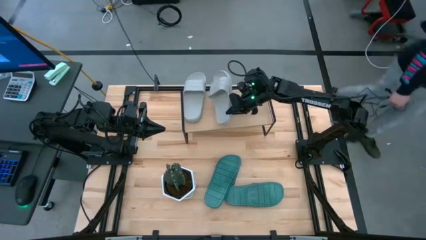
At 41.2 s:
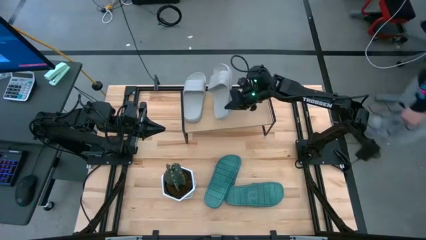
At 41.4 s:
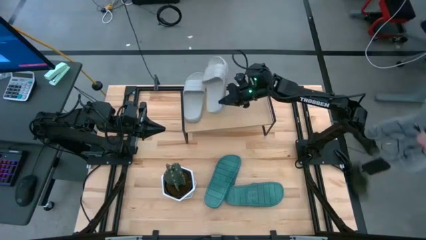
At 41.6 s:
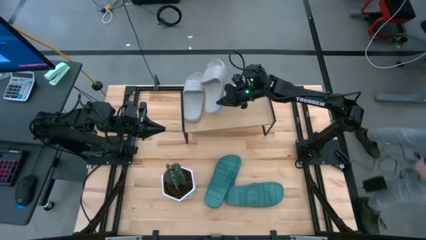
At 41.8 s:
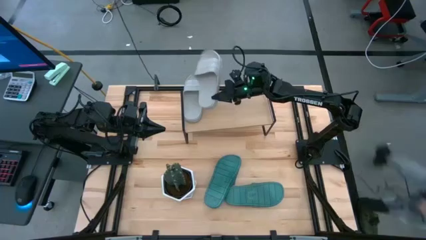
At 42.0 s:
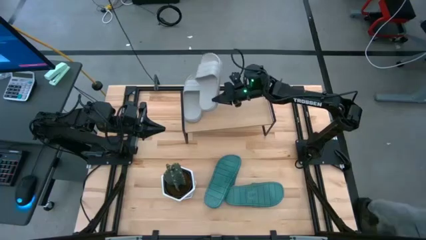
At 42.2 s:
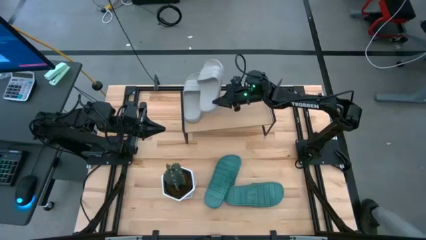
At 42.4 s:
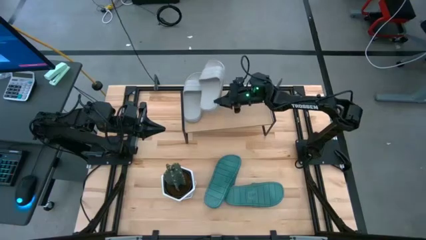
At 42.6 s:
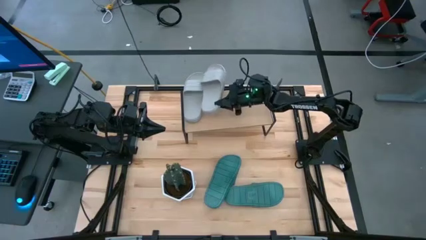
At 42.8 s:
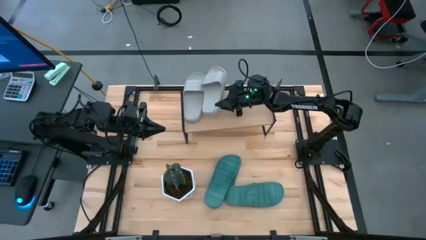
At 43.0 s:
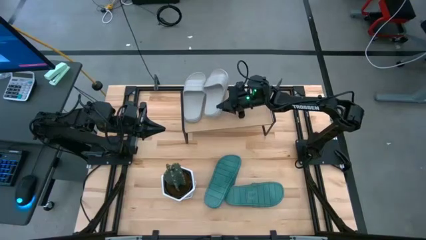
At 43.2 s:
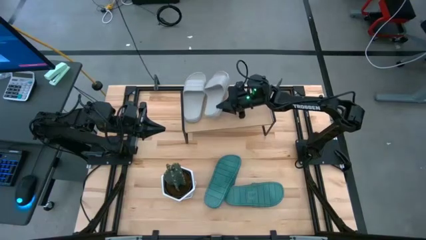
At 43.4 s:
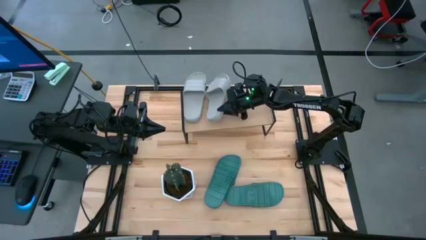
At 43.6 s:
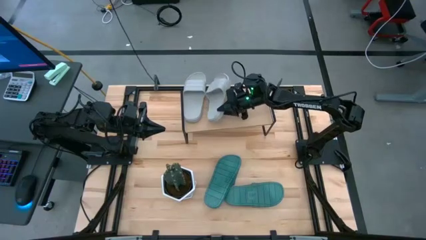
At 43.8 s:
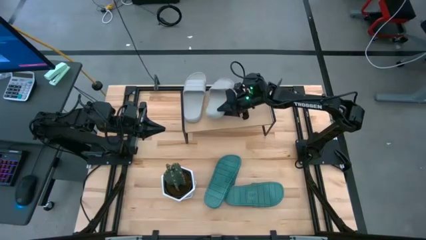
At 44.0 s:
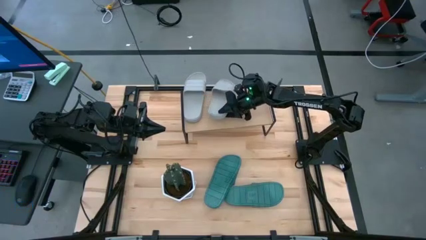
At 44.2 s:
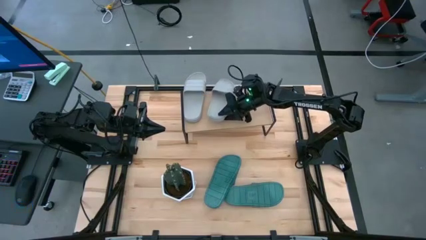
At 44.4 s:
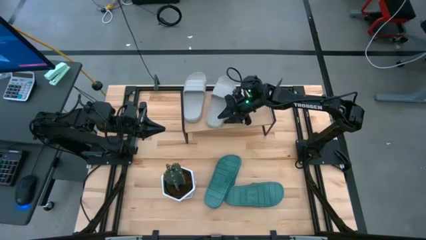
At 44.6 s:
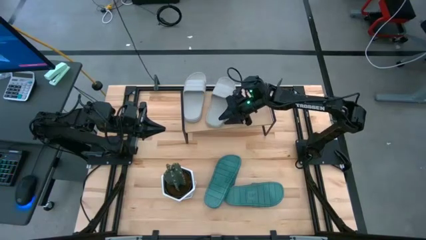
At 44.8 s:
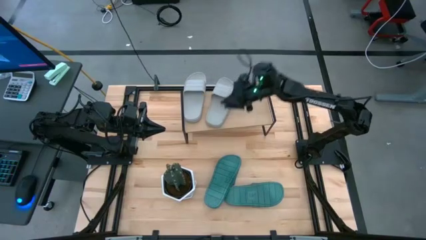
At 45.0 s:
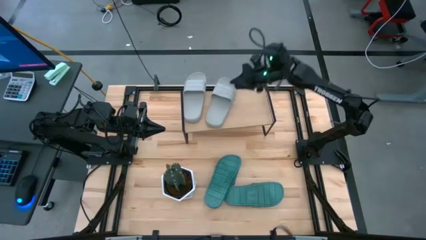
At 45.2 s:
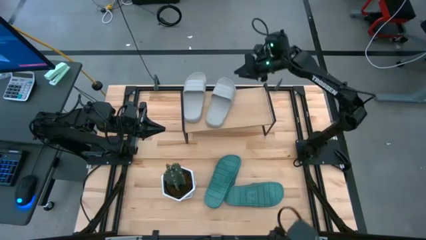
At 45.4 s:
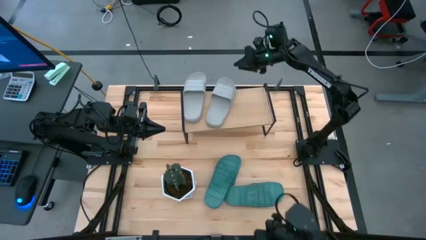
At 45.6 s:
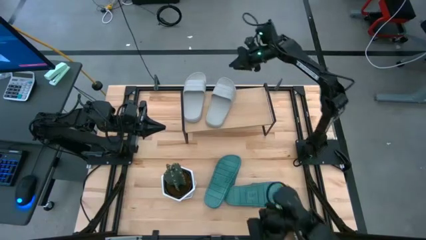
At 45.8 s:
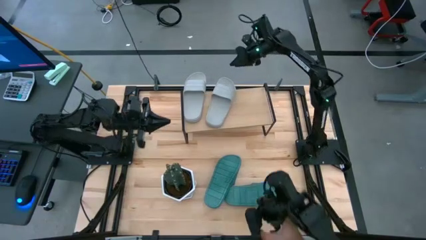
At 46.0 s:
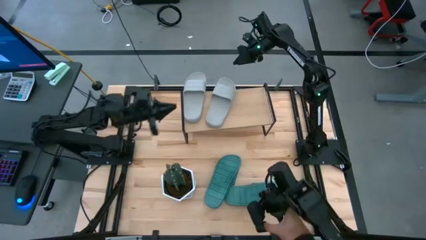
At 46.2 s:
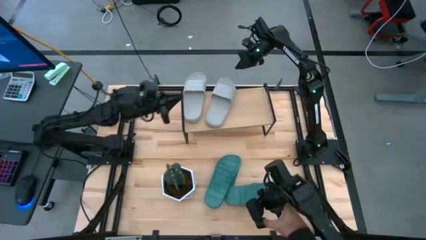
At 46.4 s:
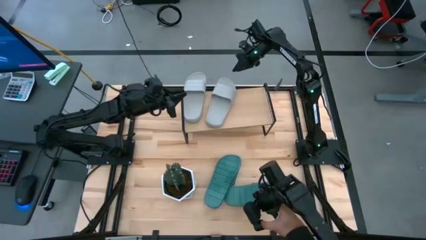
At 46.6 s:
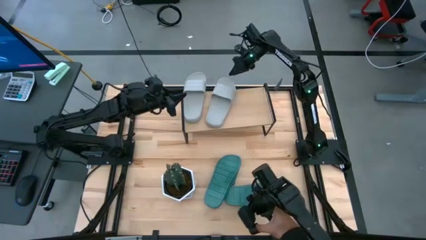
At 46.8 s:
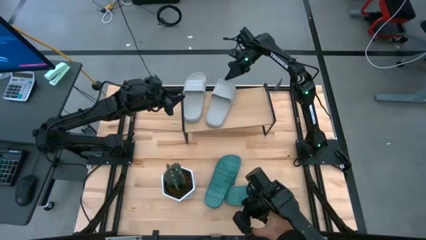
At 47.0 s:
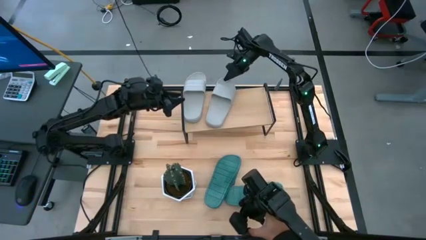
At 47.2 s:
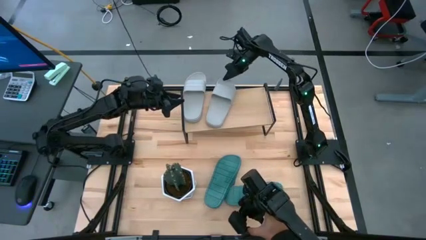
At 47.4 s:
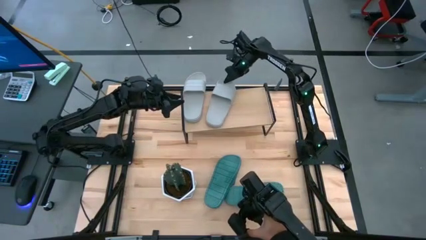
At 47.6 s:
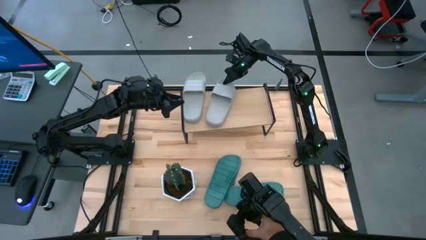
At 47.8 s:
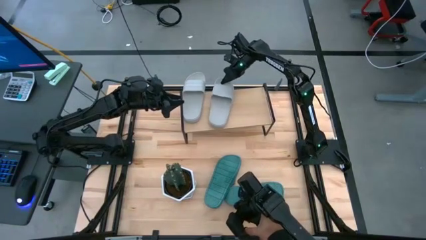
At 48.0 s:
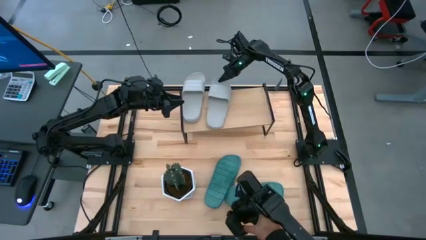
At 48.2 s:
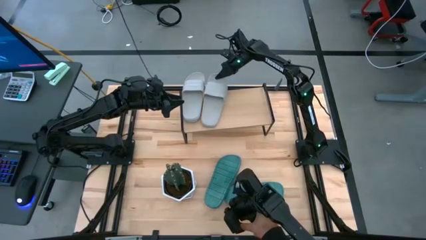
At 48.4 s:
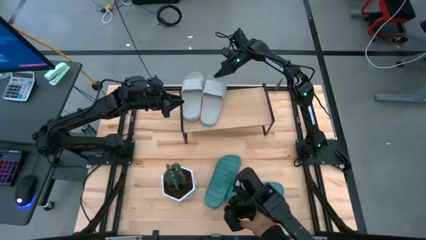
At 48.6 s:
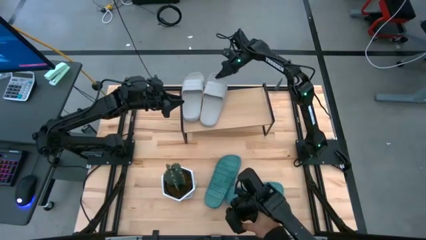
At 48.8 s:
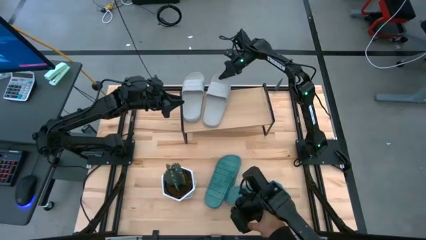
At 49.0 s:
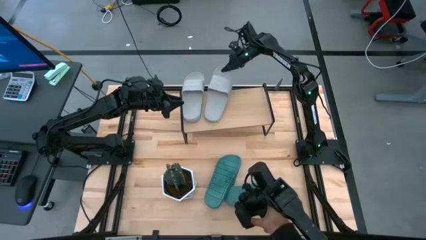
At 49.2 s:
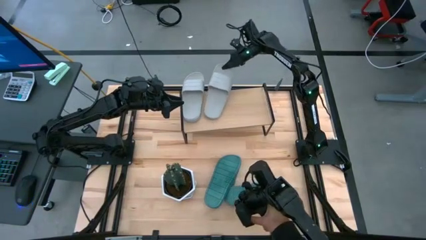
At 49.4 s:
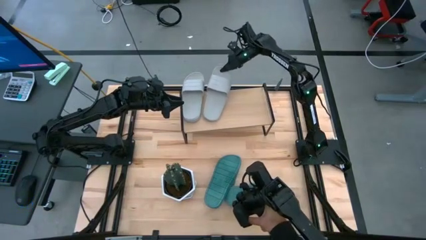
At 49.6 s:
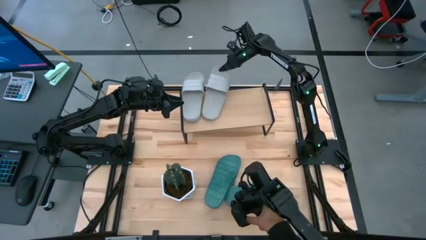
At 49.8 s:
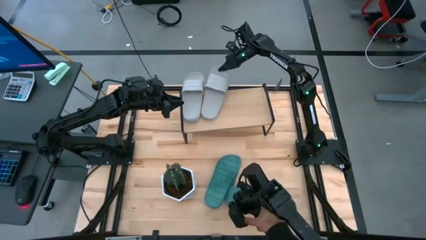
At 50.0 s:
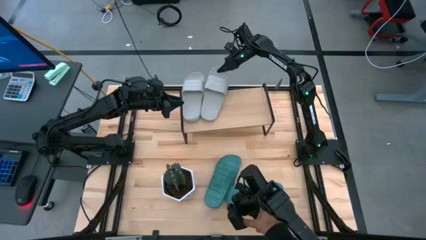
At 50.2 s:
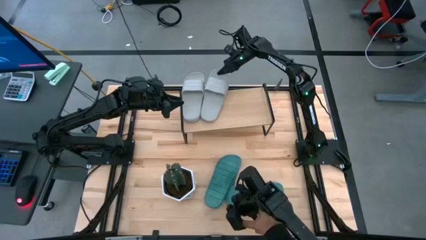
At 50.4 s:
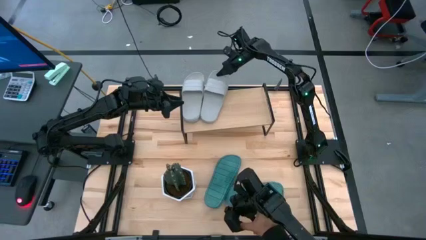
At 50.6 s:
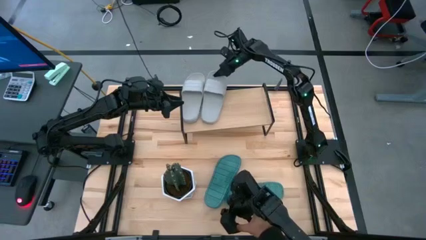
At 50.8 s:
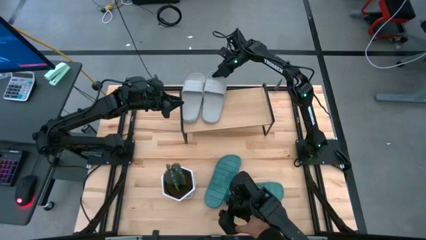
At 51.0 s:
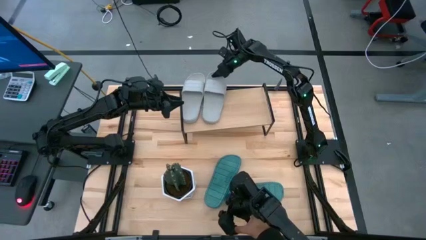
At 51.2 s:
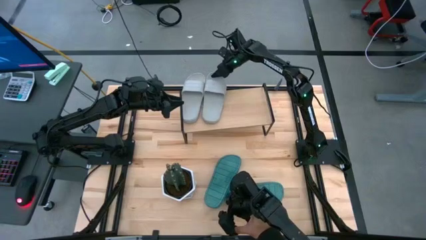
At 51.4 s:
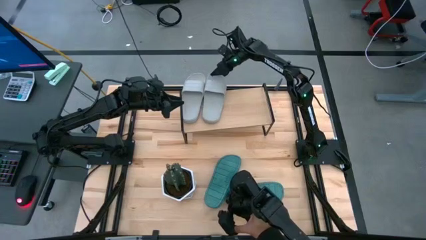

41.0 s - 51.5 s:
Task: Pick and place slides into the shelf
Put the gray slides on the shelf

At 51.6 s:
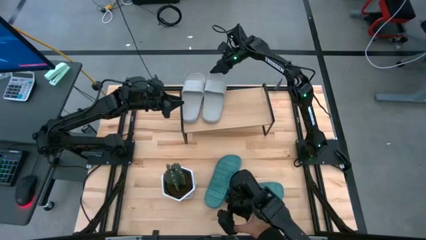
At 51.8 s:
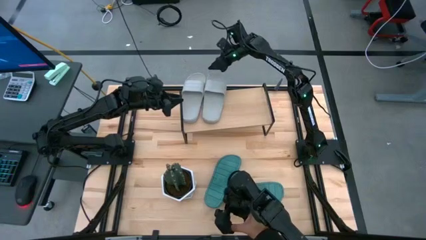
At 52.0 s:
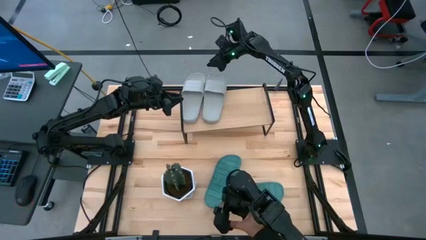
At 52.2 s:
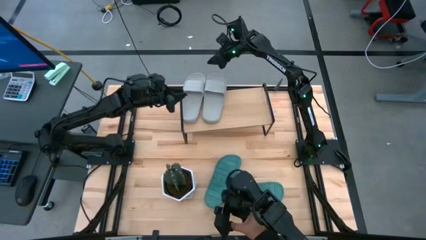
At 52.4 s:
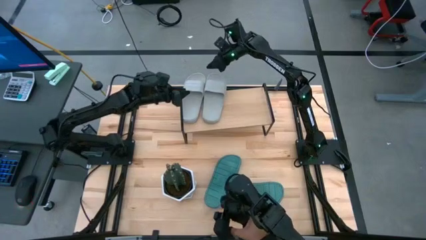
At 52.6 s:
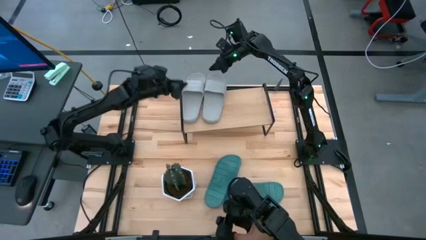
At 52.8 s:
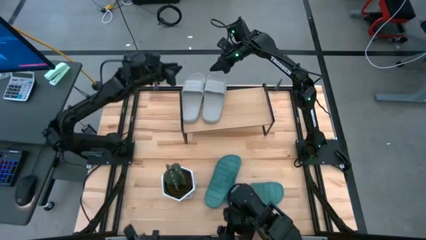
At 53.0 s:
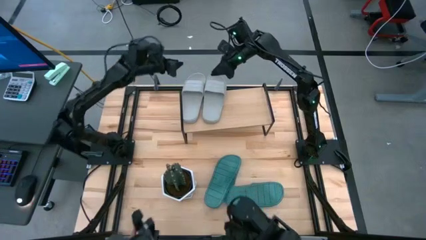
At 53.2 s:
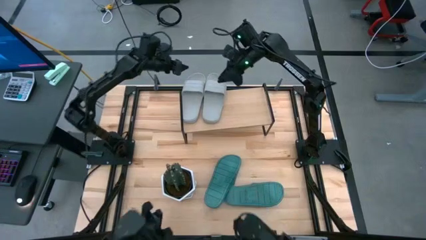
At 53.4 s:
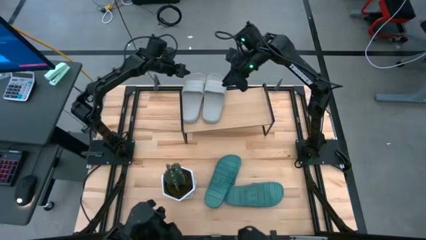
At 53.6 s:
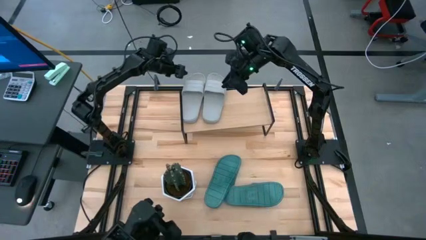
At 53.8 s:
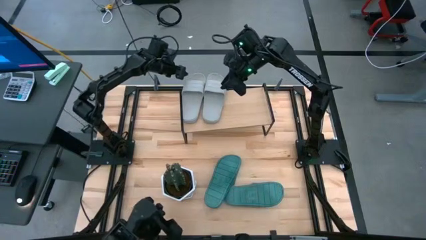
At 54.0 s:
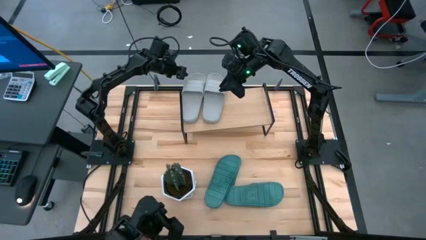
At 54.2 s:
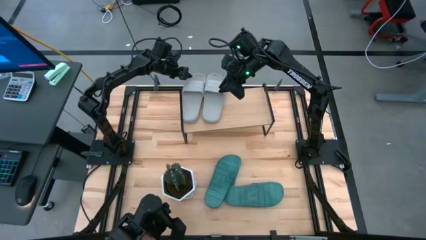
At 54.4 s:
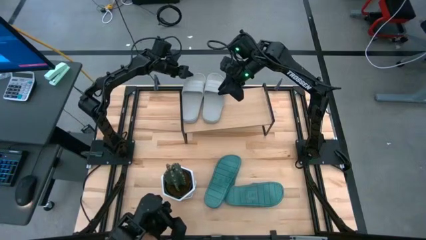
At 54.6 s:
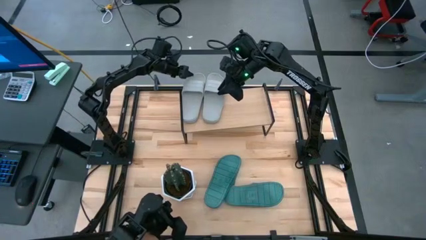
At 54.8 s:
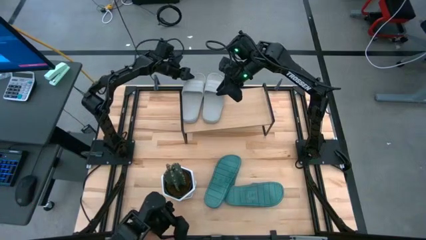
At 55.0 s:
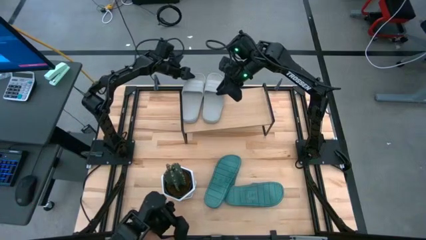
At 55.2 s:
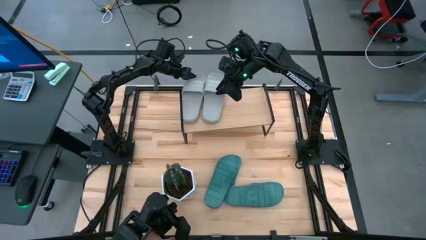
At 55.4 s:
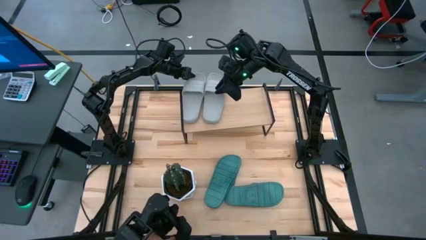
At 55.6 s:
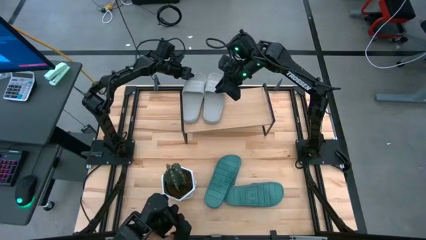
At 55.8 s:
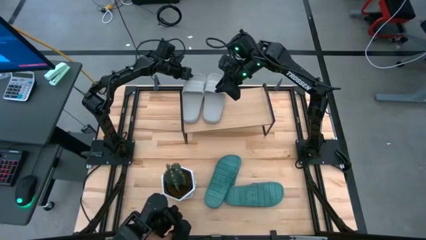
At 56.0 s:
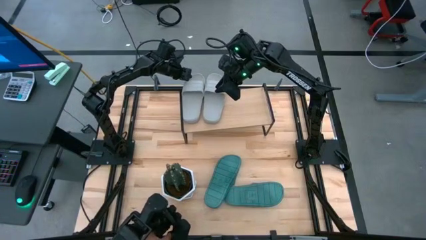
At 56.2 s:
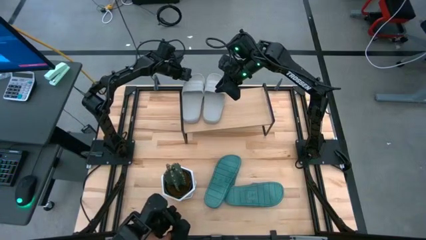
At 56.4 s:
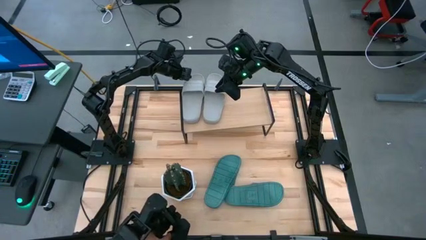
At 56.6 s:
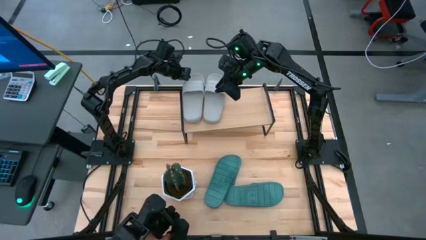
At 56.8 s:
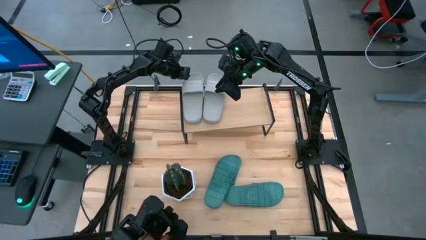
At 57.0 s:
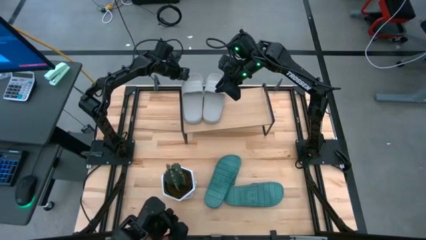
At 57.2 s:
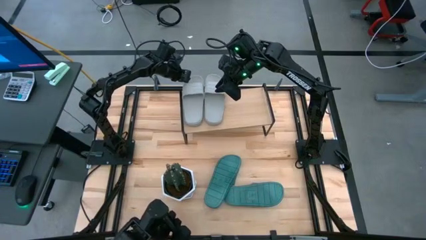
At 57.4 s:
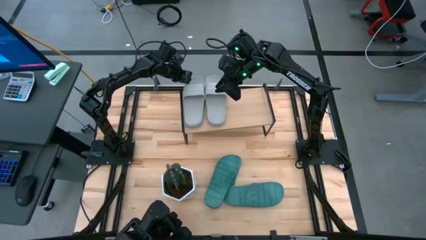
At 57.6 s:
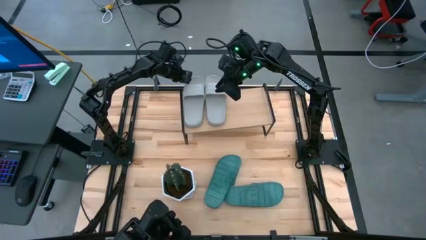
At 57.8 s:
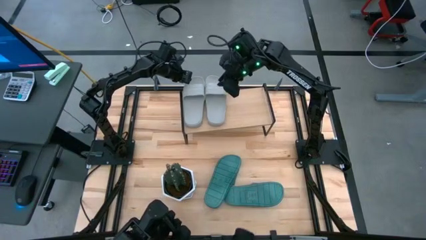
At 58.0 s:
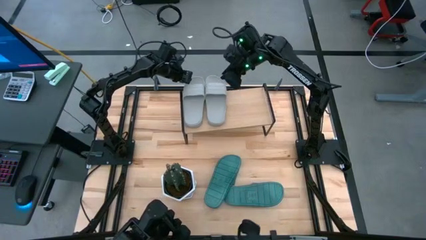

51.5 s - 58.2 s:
Adjust the gray slides on the shelf
